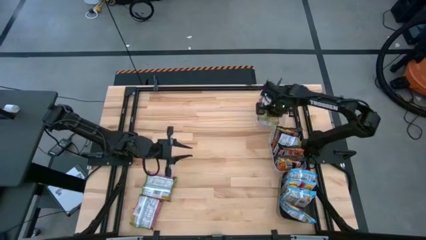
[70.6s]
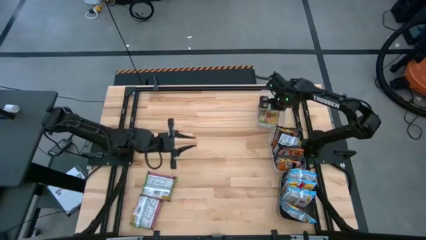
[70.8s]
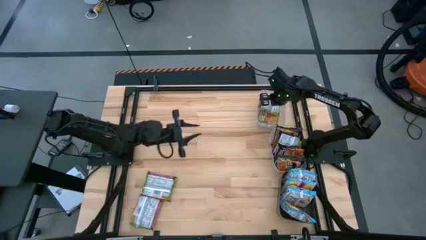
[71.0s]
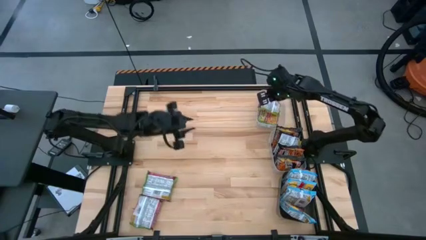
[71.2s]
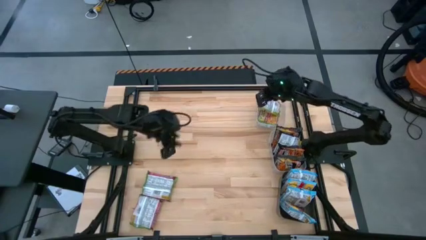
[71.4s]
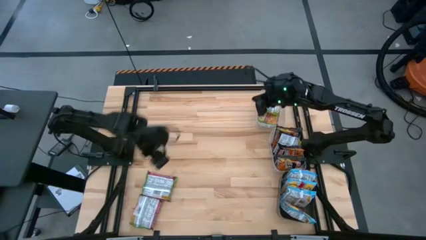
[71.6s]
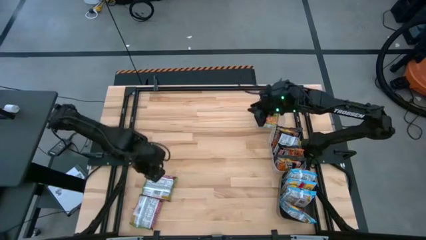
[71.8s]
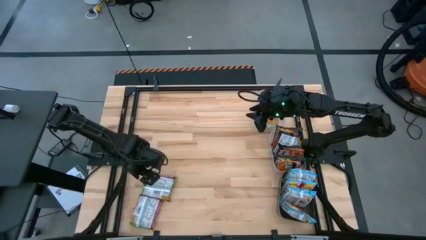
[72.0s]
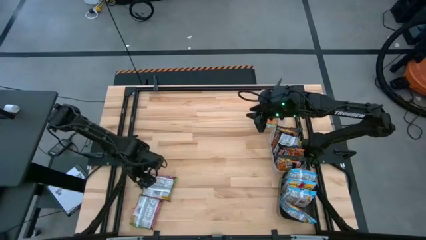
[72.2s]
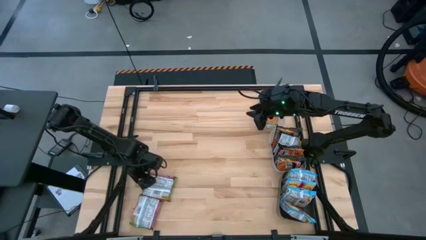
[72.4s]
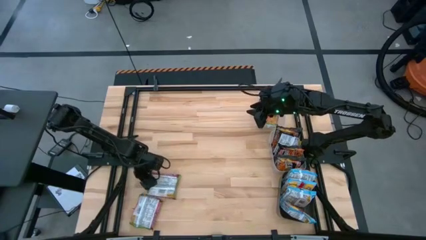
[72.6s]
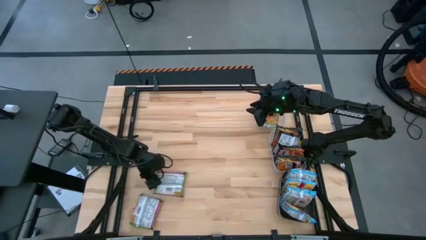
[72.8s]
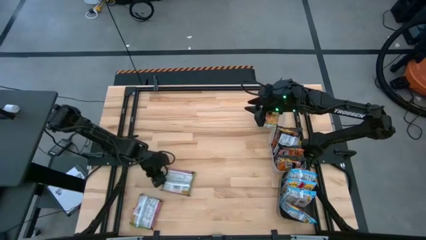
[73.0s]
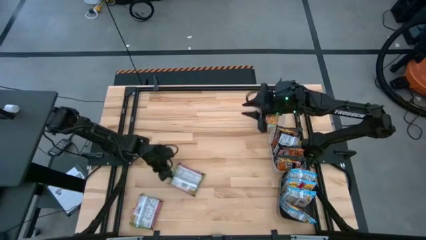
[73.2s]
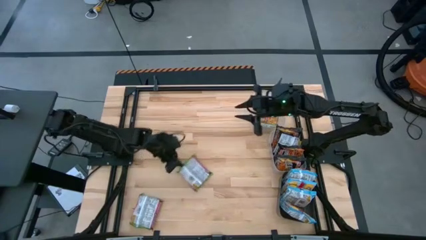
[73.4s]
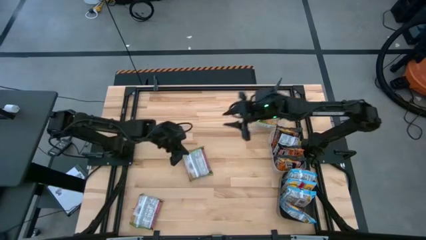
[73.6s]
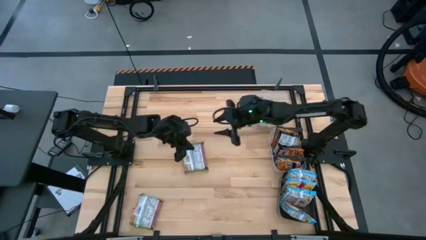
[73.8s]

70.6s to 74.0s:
Task: Sort Maruchan noodles
Put the green noodle pack into the top transparent bin

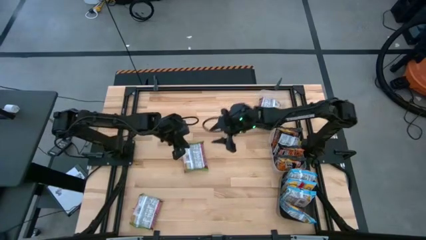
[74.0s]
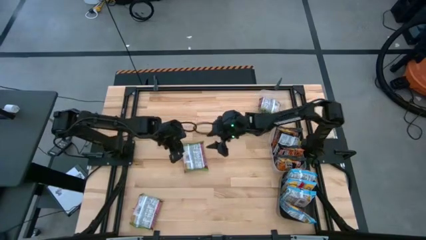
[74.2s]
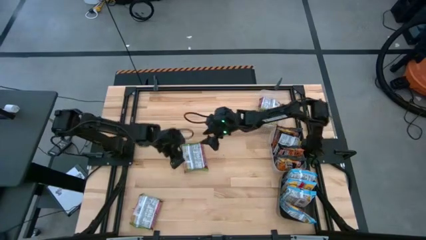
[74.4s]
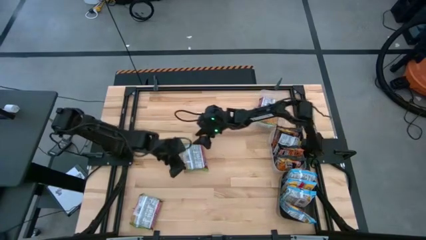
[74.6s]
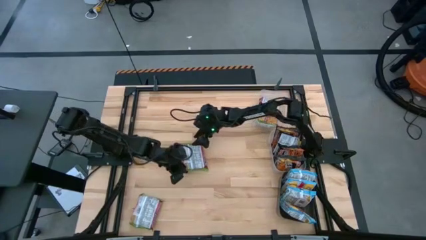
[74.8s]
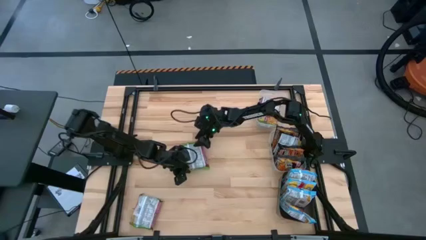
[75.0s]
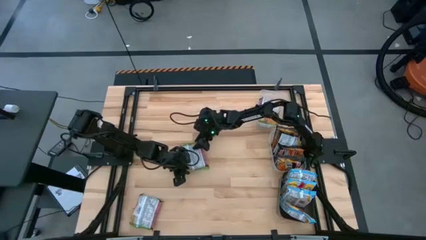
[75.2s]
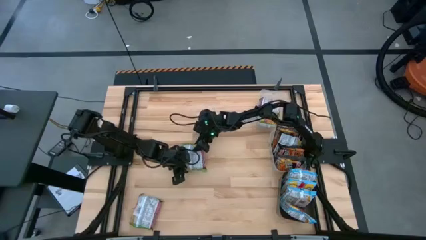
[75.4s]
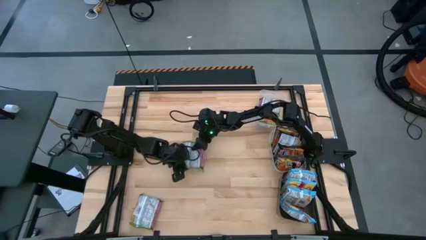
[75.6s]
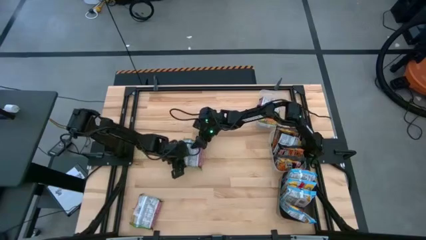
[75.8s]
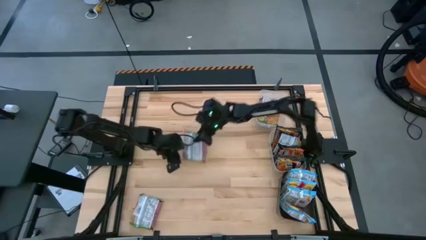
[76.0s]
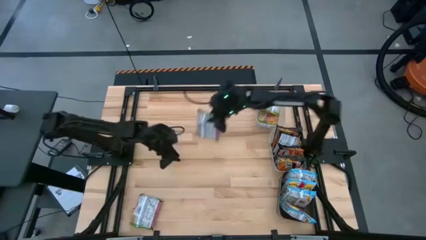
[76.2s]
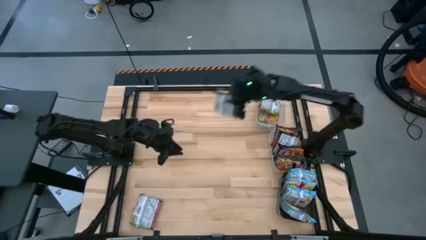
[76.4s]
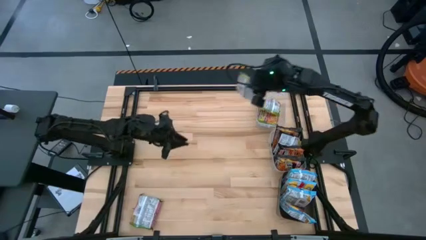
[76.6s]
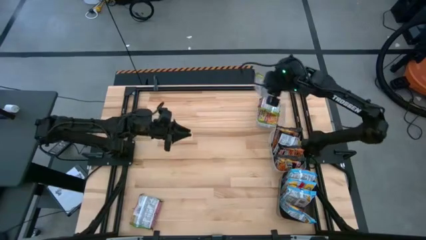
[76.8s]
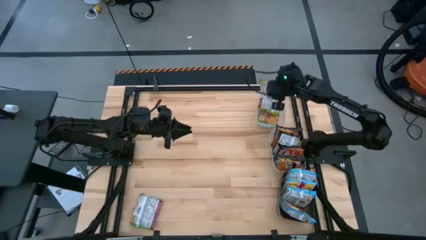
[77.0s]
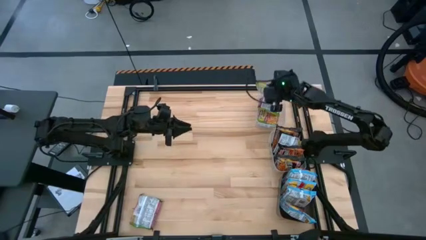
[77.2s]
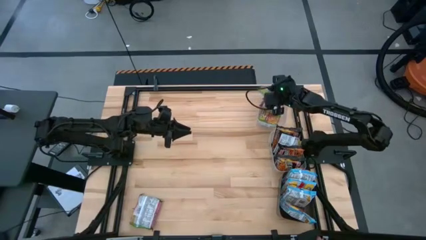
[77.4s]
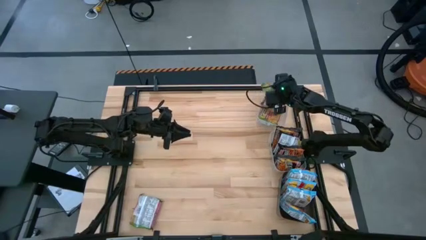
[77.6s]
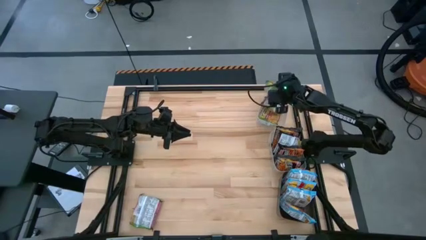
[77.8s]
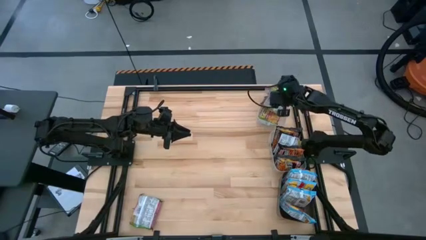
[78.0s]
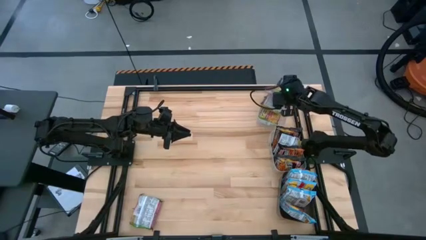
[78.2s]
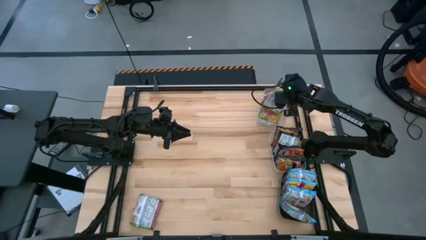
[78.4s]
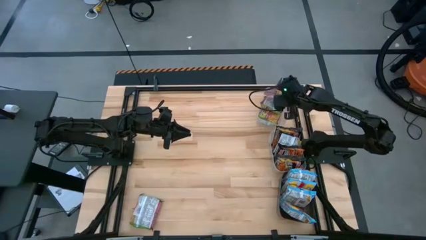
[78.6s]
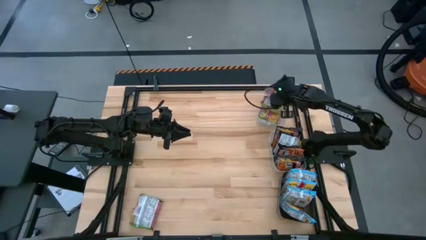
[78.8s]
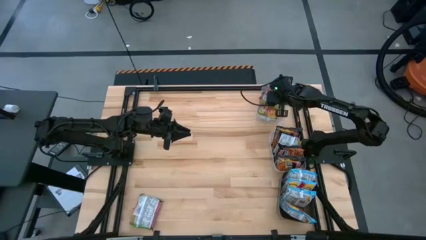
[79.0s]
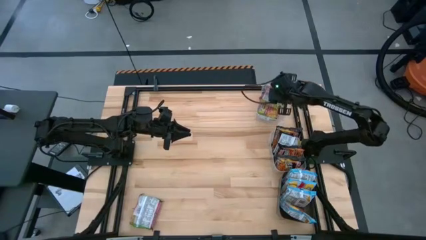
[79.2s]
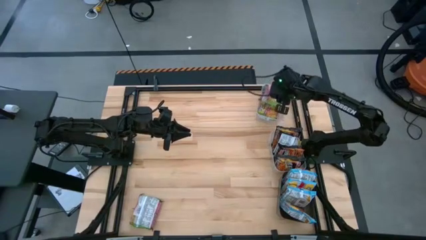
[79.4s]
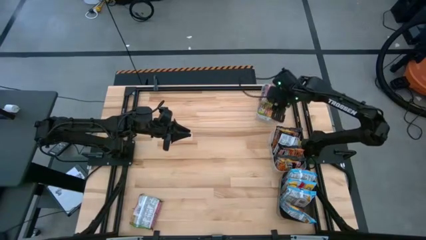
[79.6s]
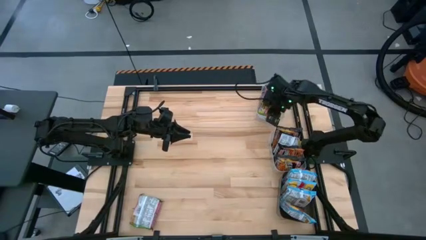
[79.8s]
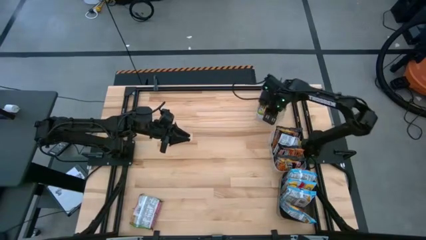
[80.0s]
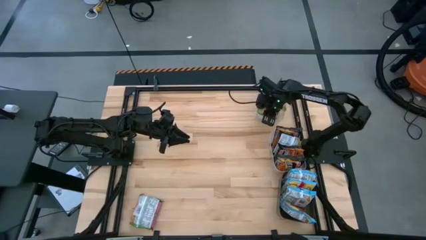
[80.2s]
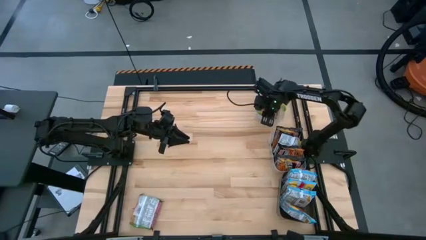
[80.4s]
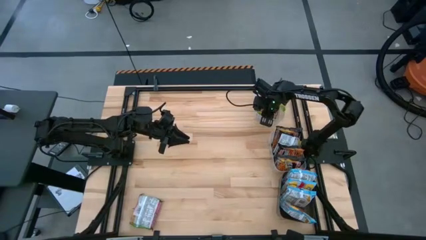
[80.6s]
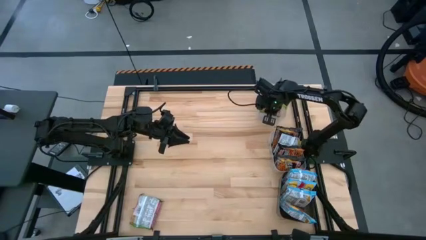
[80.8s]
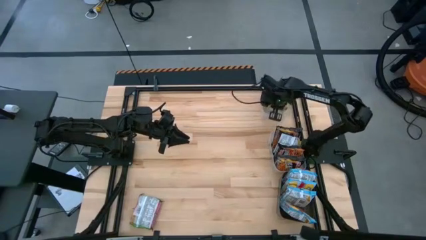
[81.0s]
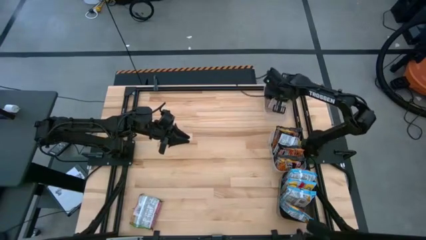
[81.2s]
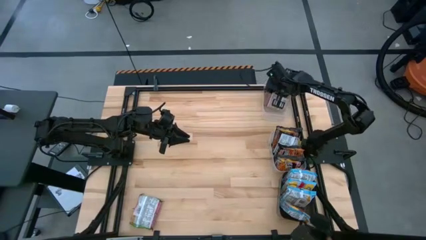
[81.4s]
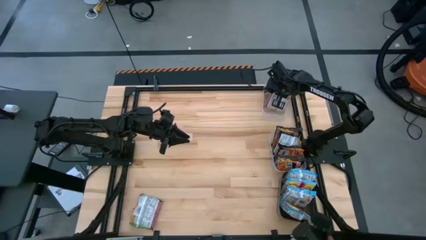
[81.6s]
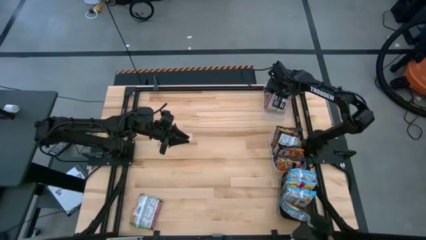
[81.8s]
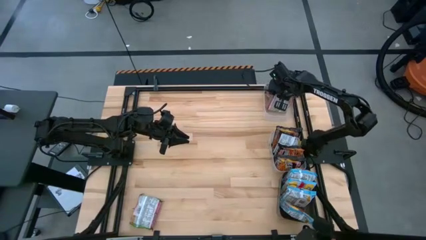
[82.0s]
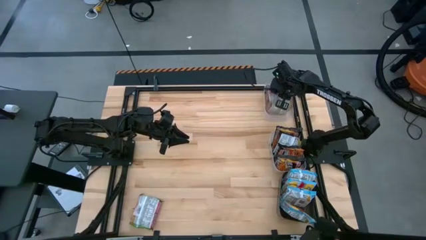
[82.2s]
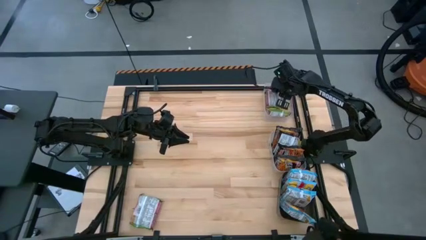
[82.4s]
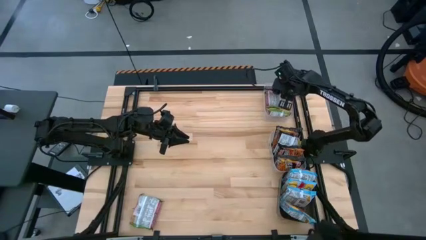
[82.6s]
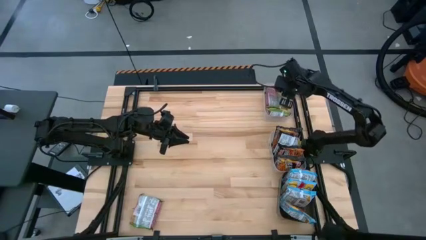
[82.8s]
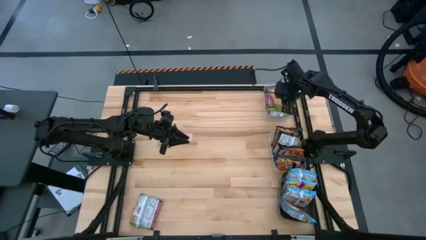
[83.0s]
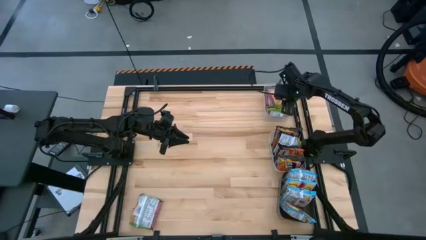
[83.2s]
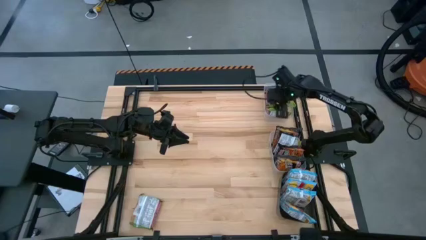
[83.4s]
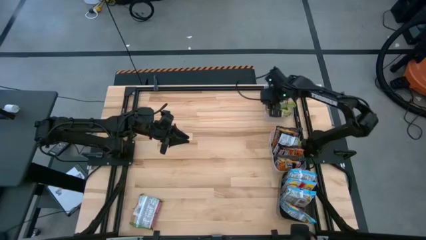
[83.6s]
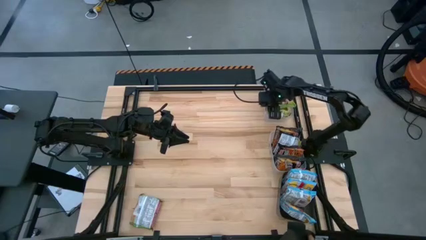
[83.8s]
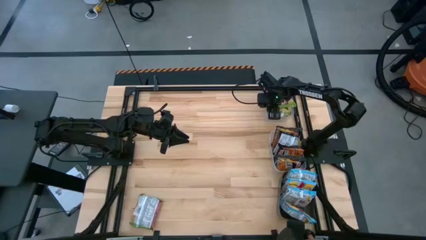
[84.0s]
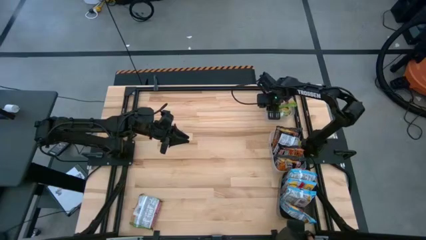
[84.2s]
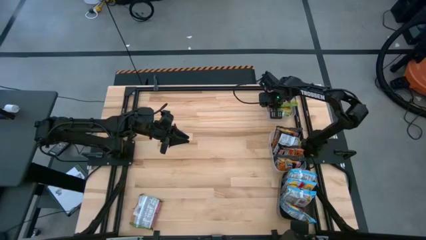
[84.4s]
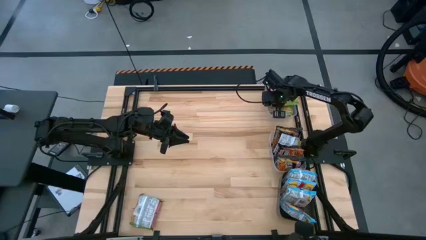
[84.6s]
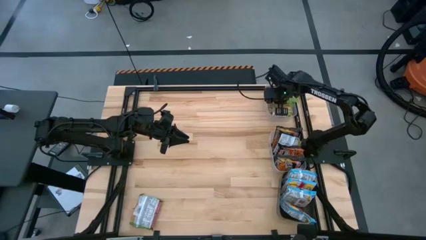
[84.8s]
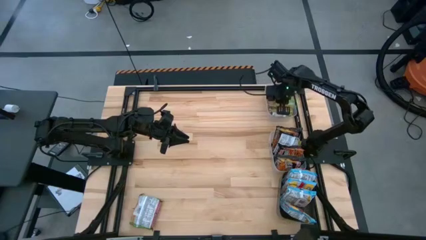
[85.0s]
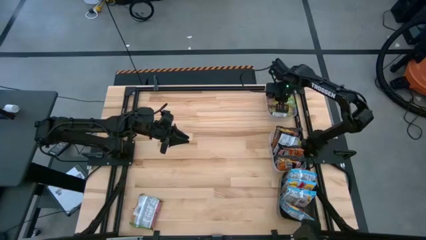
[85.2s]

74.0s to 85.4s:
Put the green noodle pack into the top transparent bin

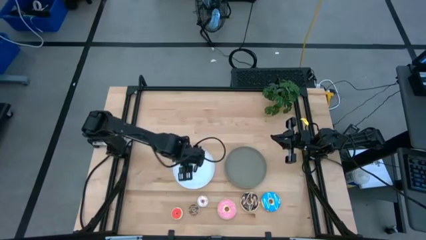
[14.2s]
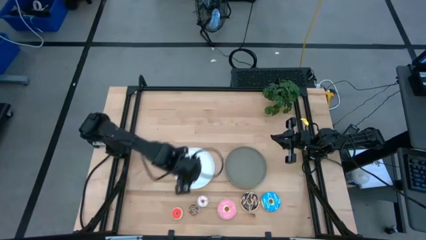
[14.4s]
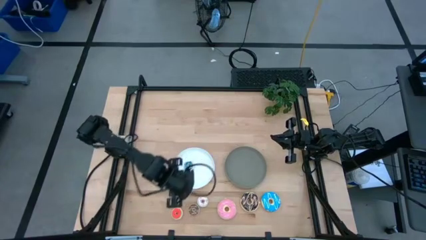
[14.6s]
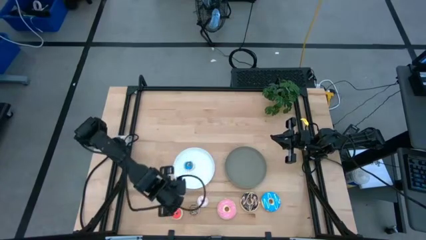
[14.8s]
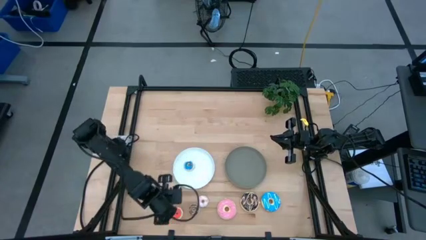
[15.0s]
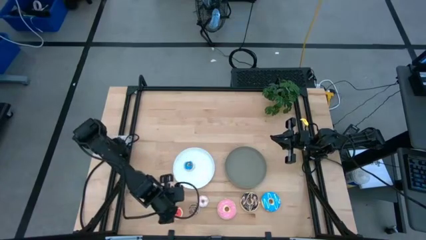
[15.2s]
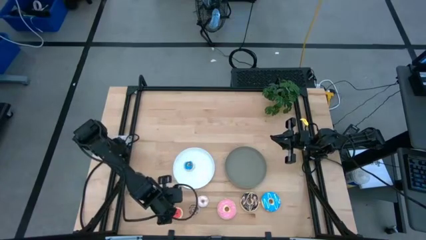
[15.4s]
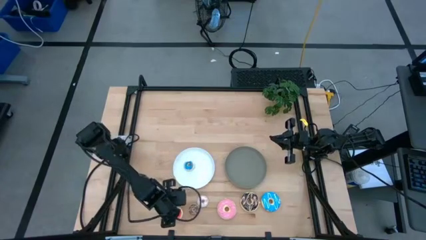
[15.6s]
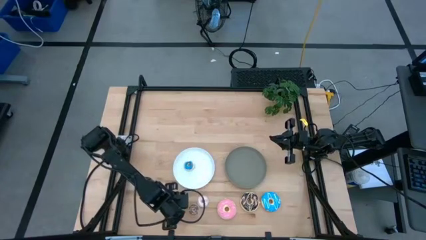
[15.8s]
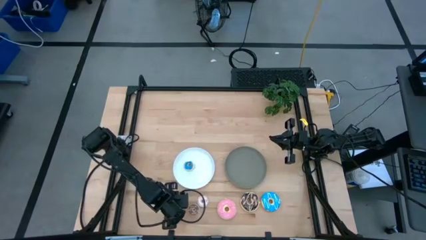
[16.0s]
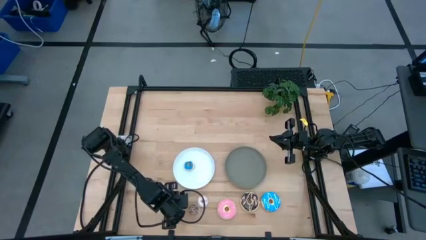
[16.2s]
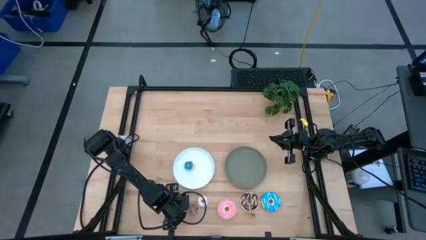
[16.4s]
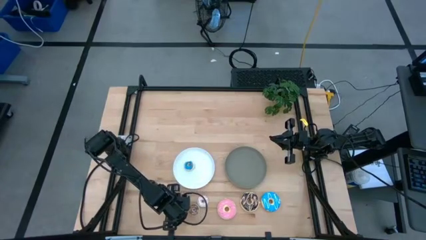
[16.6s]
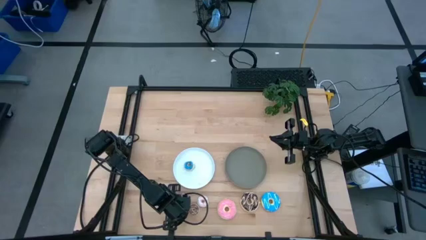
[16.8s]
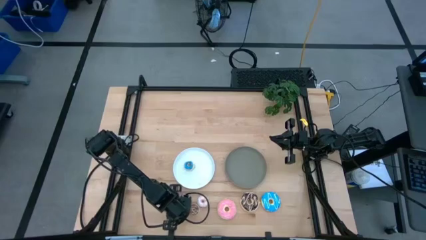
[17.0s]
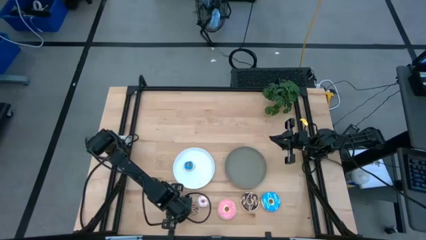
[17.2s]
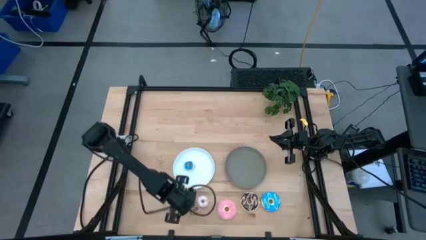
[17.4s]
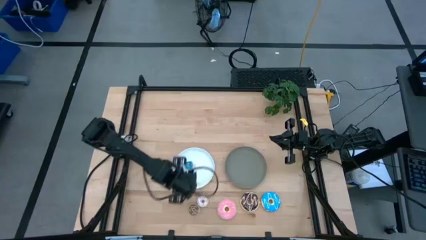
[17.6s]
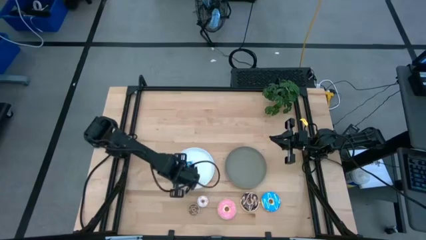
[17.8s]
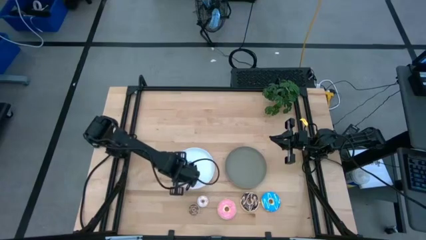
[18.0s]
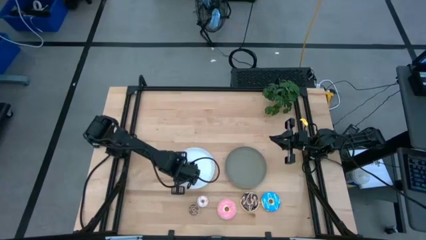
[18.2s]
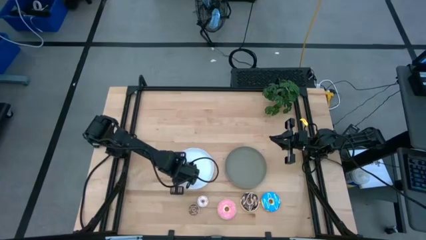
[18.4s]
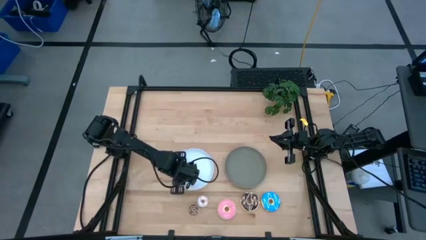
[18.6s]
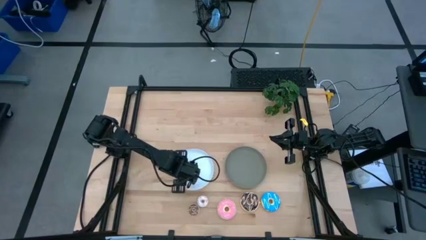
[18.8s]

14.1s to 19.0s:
Task: Pick & Place donuts
Put the small orange donut on the white plate
